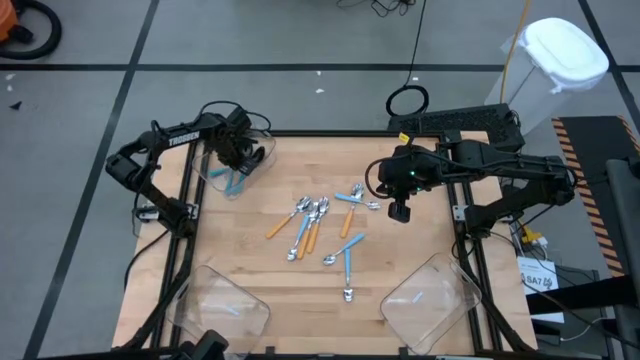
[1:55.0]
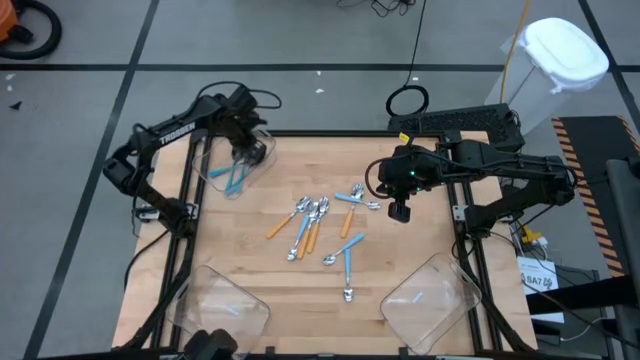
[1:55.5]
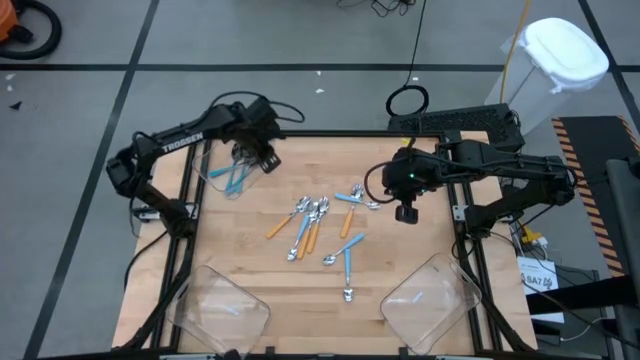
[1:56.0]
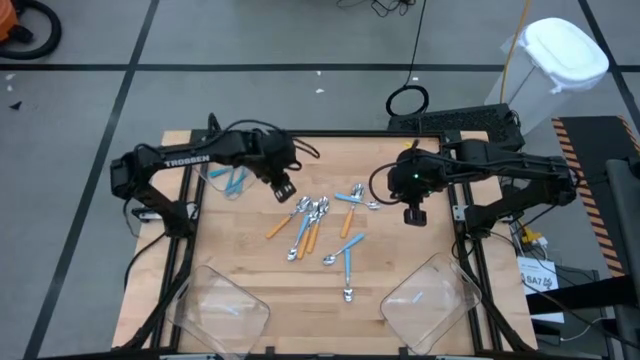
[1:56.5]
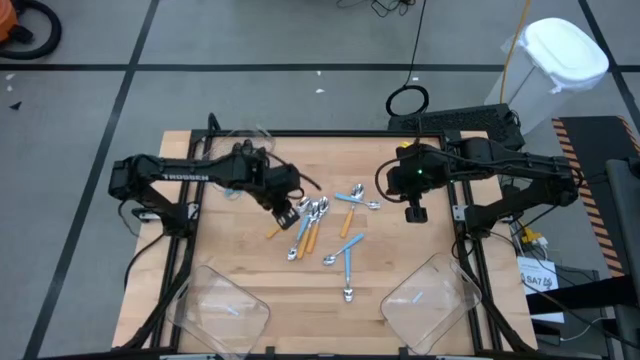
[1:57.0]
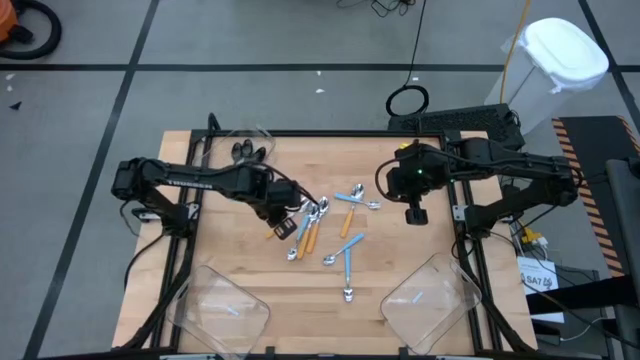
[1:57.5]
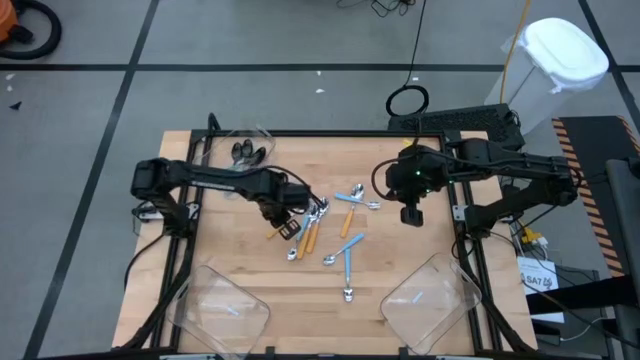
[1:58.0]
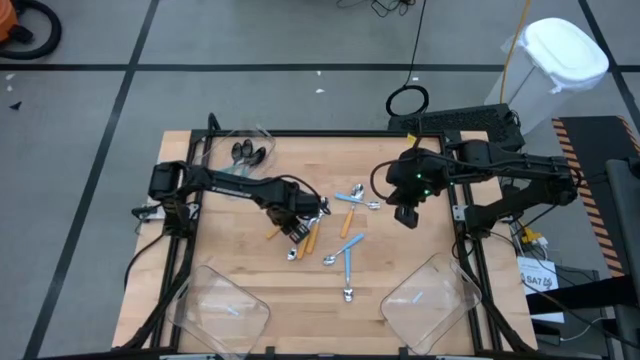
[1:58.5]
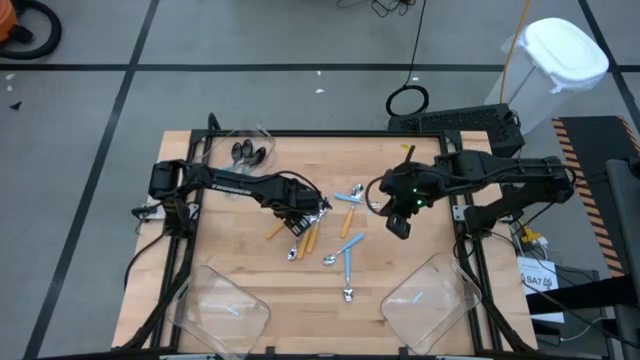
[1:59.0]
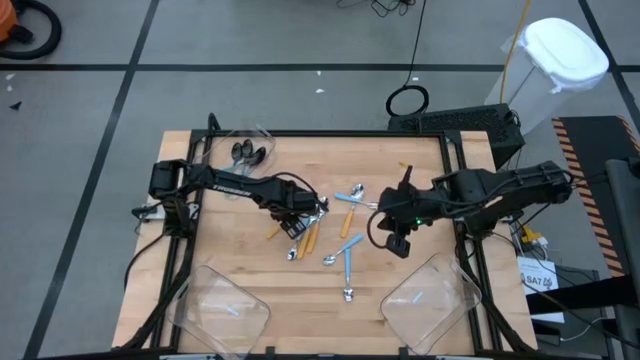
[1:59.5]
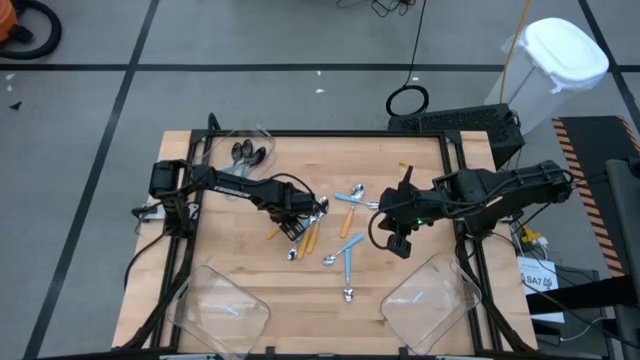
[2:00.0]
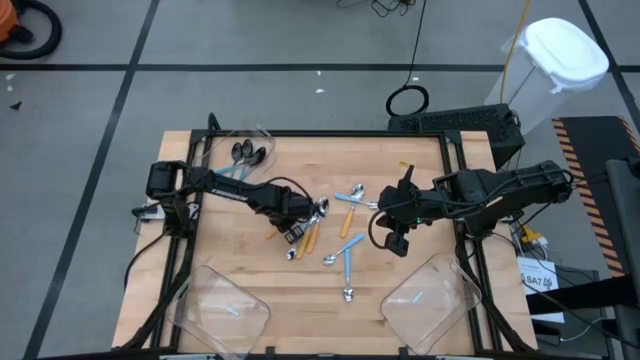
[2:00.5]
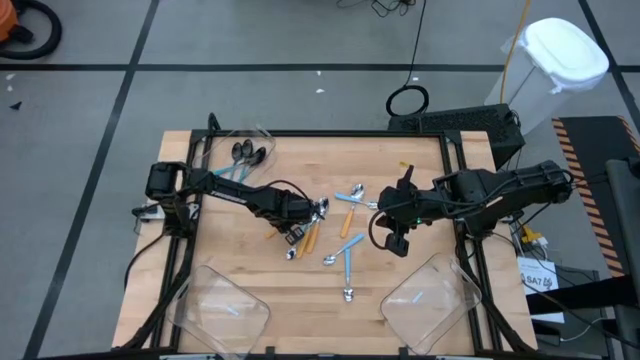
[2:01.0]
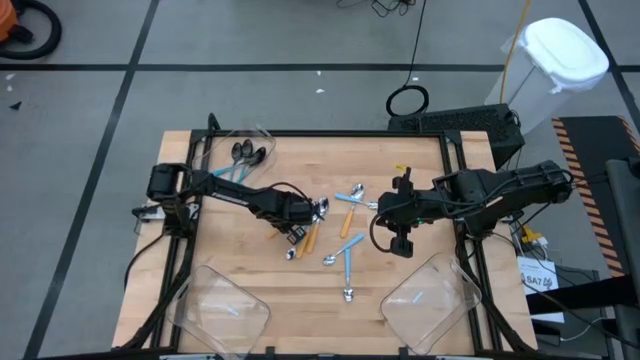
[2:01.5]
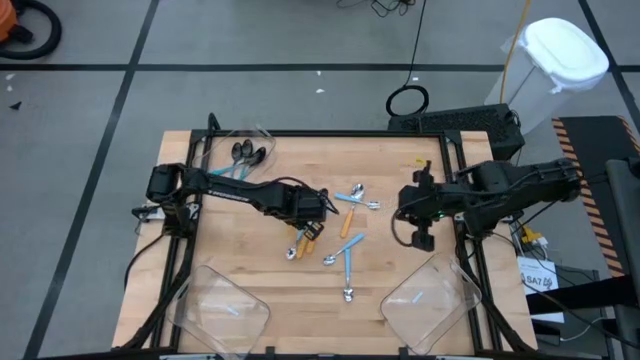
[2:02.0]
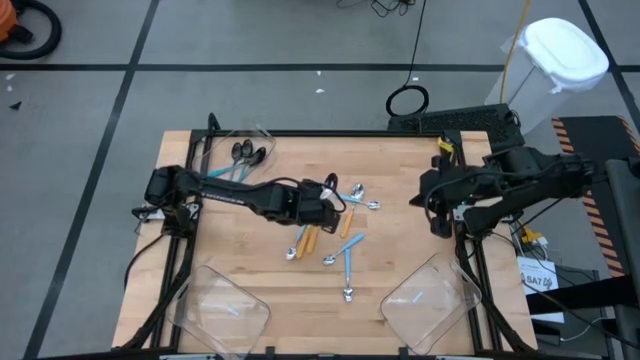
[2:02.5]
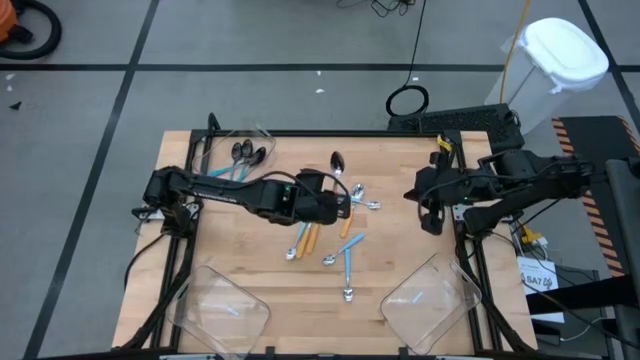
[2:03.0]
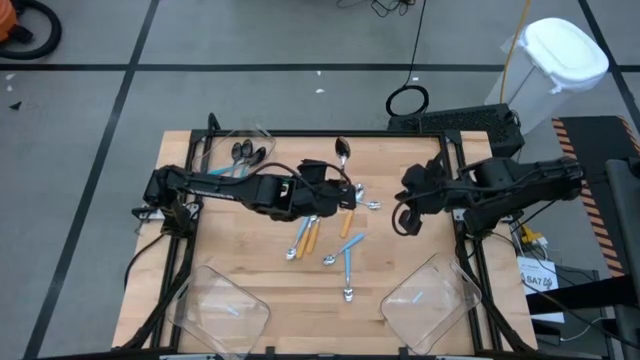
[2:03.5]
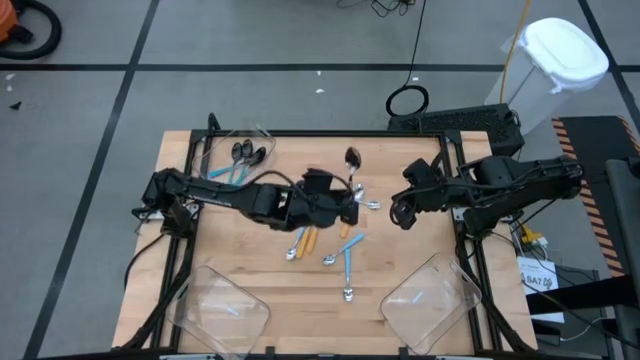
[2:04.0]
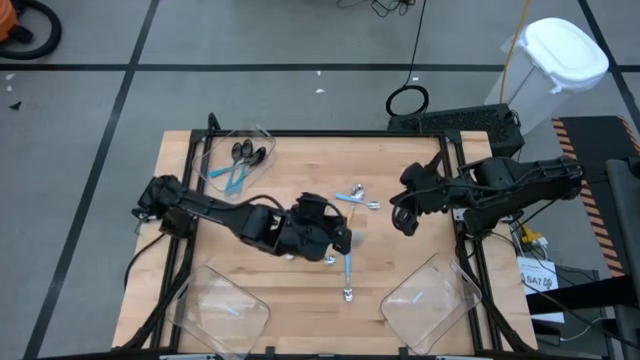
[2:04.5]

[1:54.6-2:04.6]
Task: Sort silverware by color (type)
Put the yellow spoon into the bottom left transparent bin

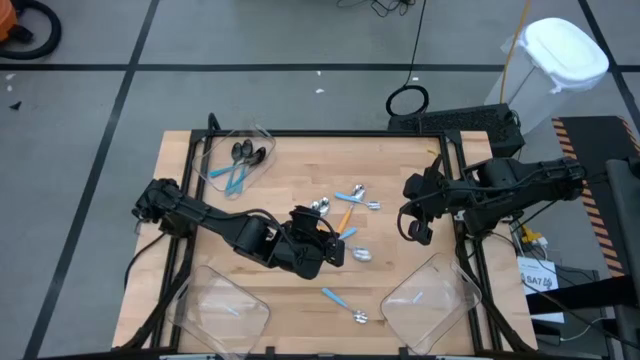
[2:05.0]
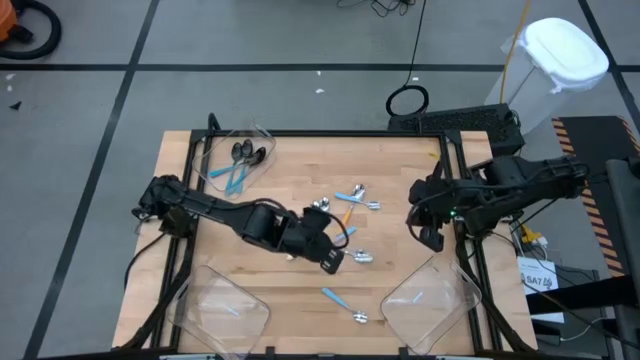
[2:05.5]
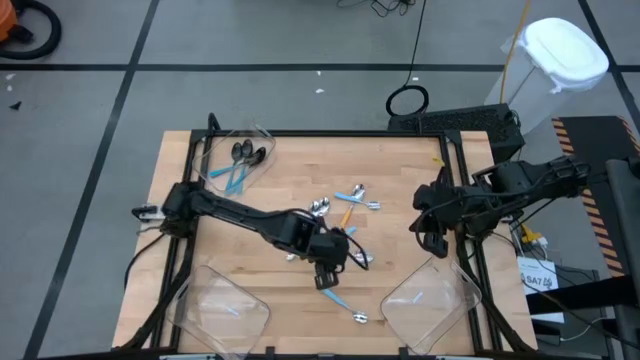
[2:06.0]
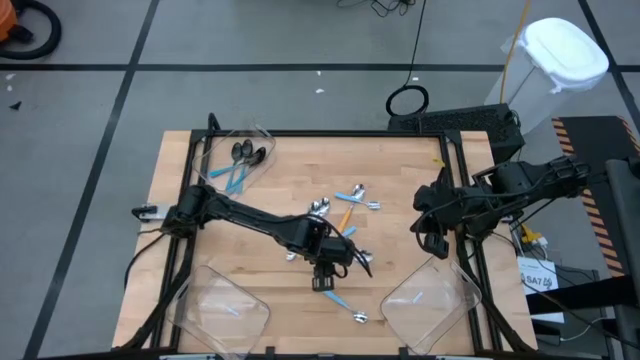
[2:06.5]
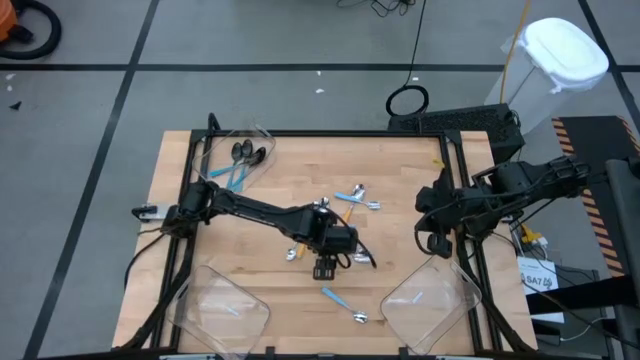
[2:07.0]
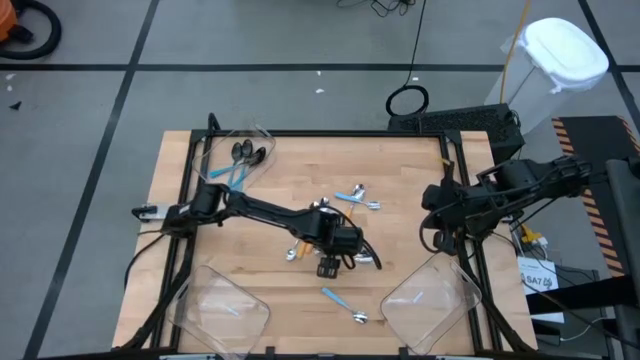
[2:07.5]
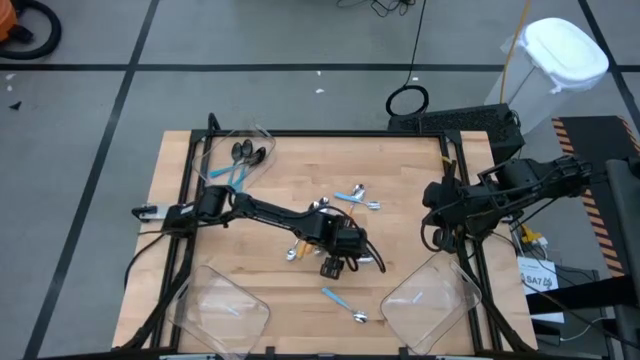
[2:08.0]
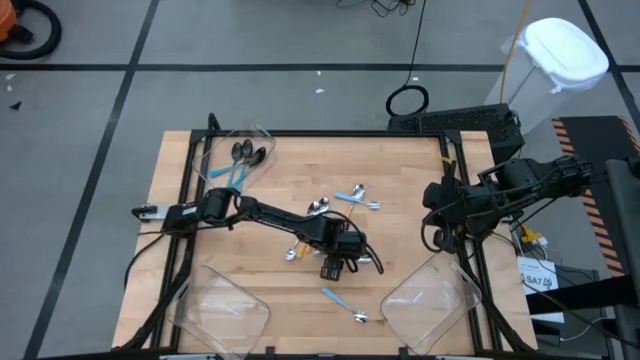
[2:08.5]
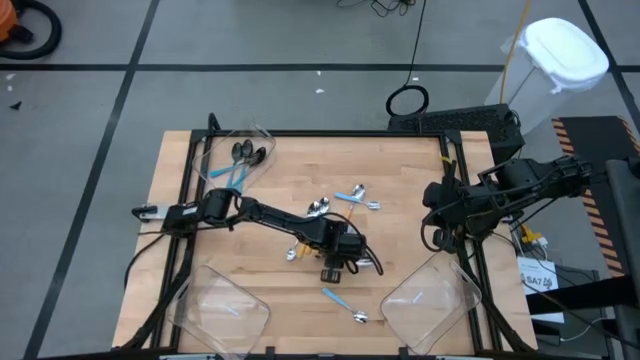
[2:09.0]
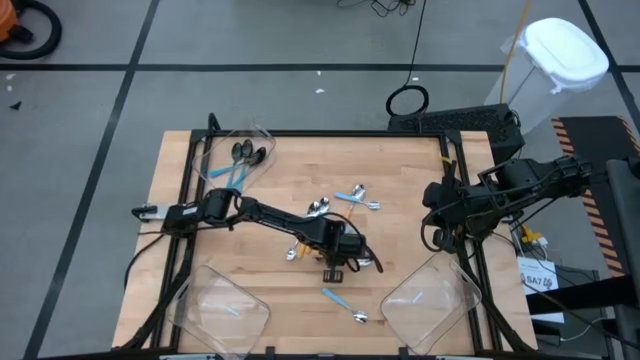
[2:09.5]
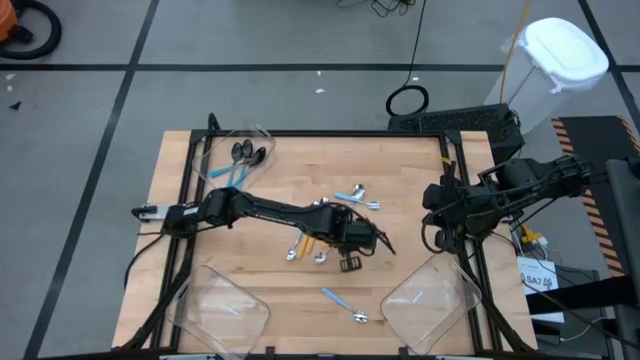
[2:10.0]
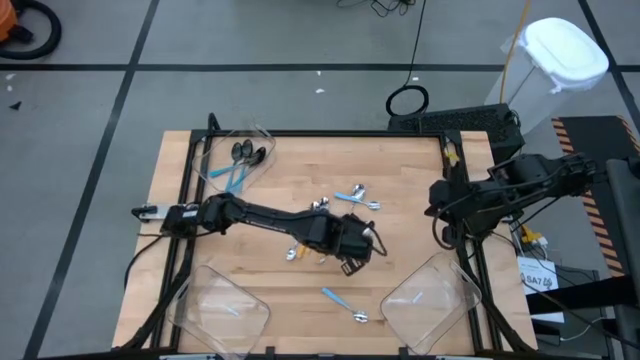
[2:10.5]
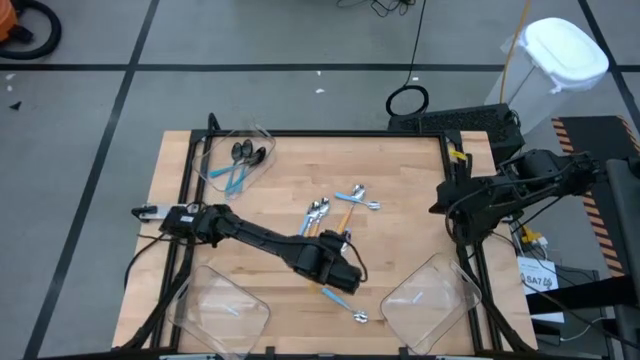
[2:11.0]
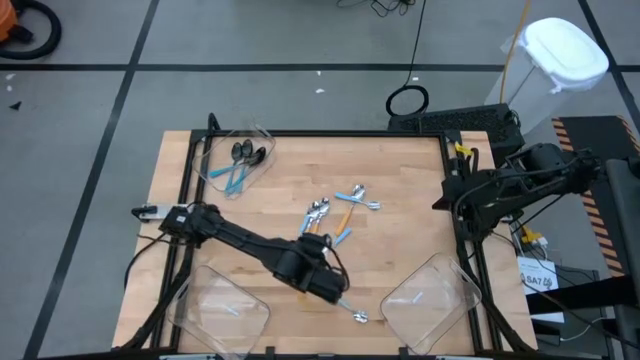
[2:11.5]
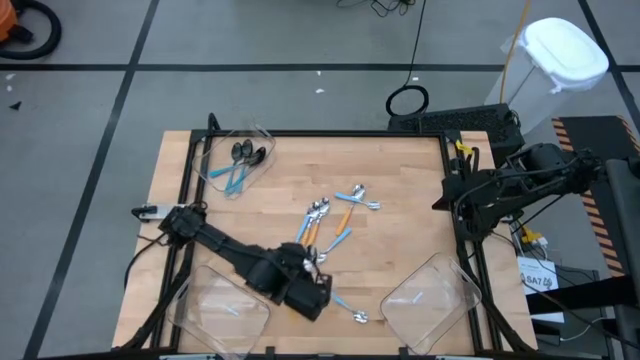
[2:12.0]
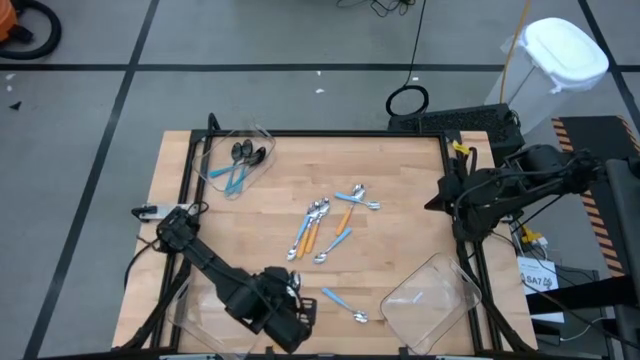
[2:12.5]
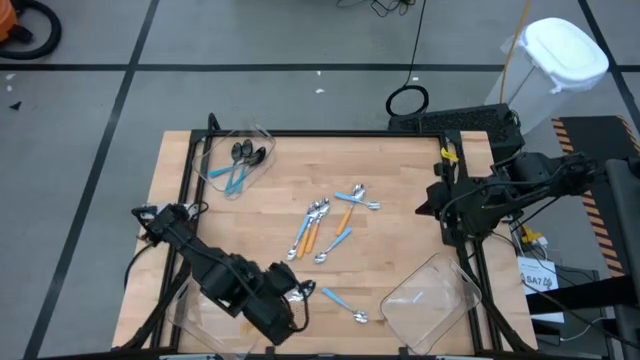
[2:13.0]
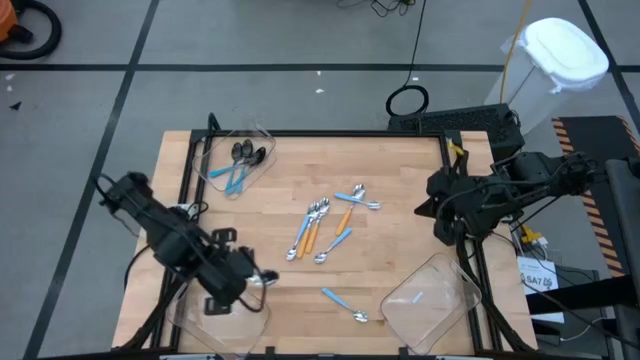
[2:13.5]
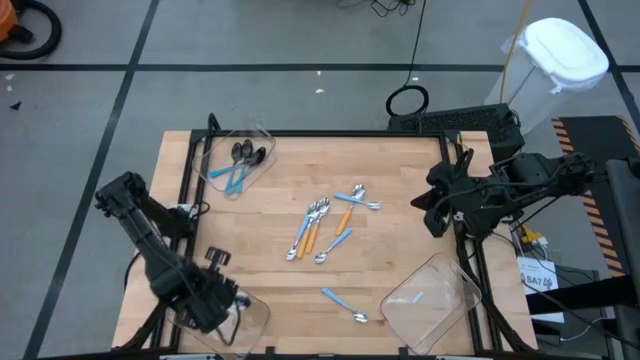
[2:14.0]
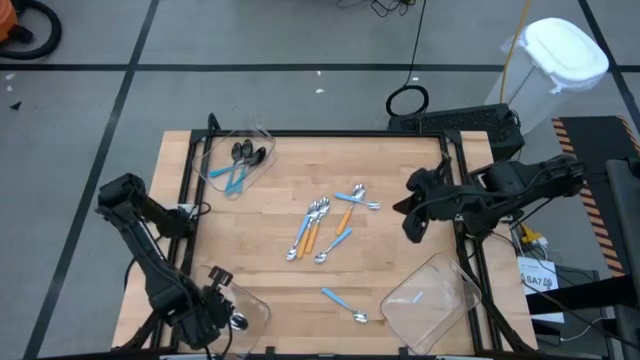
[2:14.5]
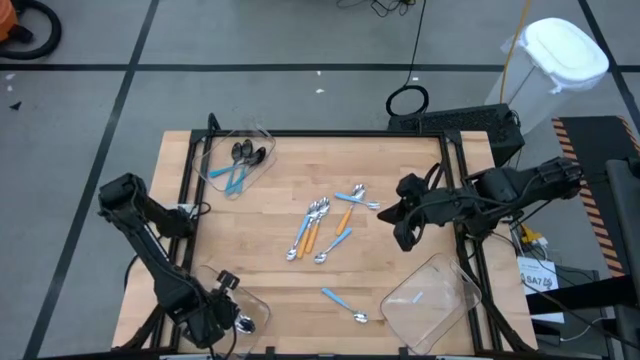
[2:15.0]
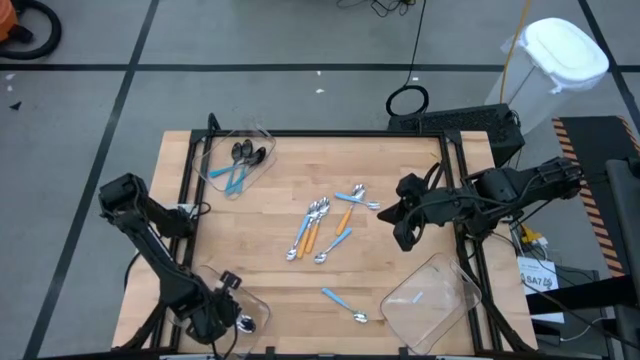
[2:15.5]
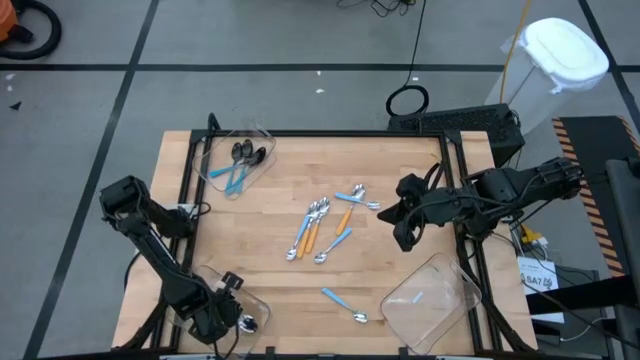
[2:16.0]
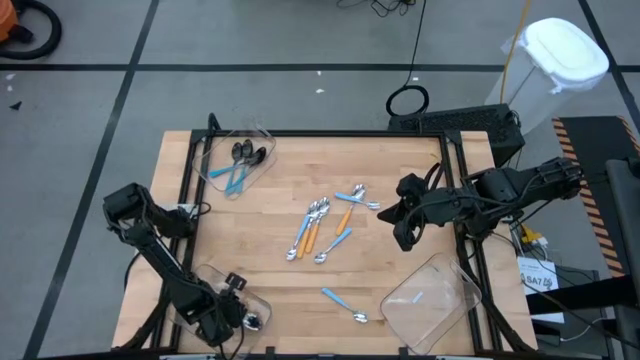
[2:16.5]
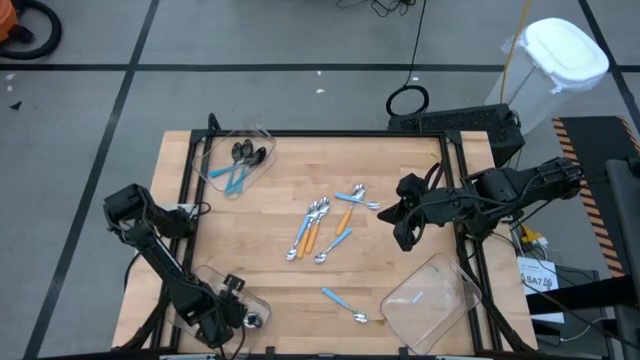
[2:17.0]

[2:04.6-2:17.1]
Put the yellow spoon into the bottom left transparent bin
